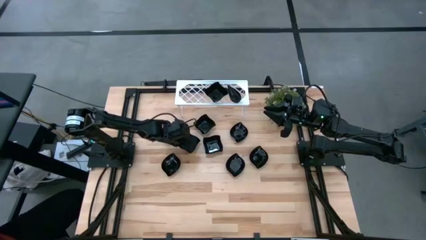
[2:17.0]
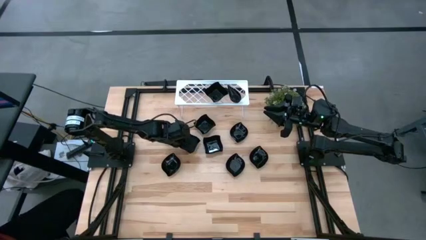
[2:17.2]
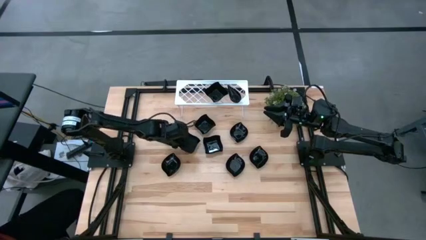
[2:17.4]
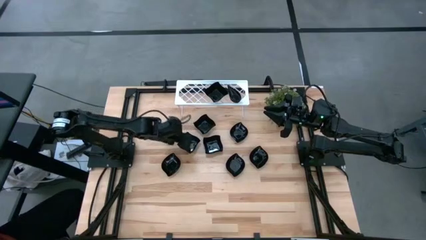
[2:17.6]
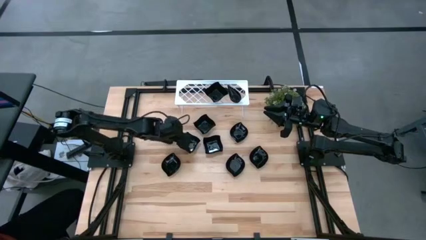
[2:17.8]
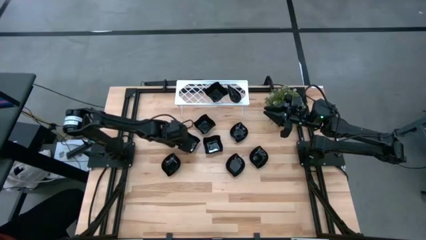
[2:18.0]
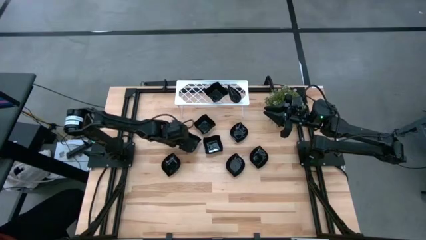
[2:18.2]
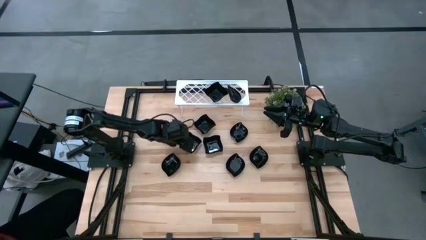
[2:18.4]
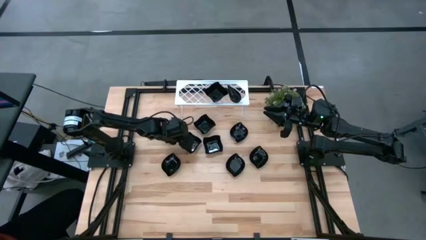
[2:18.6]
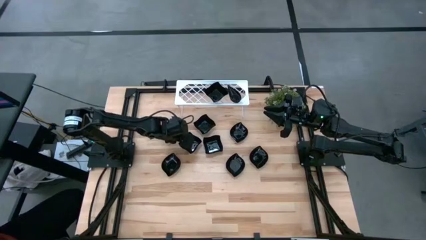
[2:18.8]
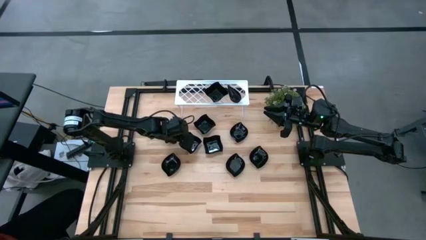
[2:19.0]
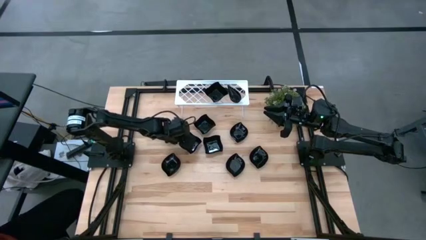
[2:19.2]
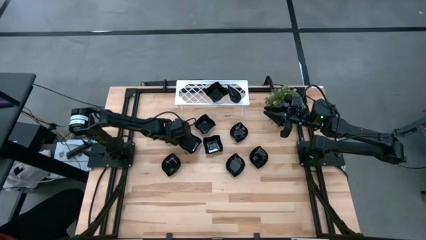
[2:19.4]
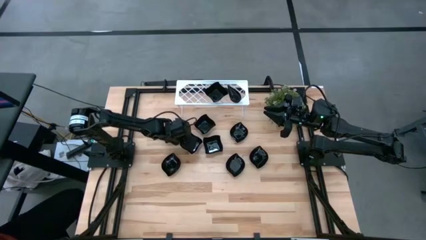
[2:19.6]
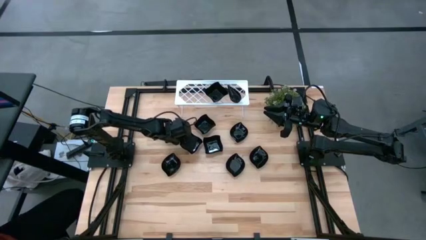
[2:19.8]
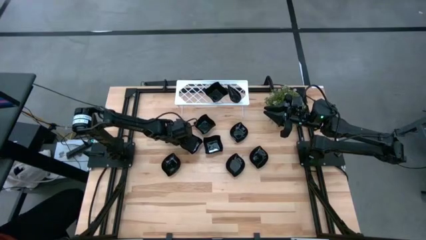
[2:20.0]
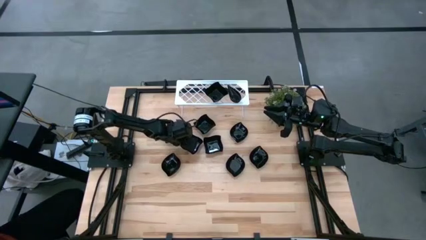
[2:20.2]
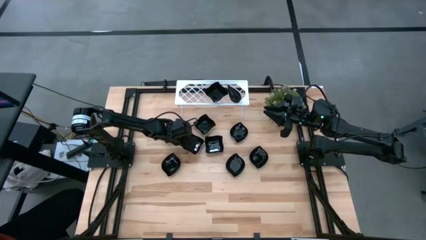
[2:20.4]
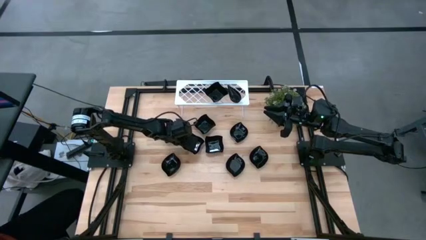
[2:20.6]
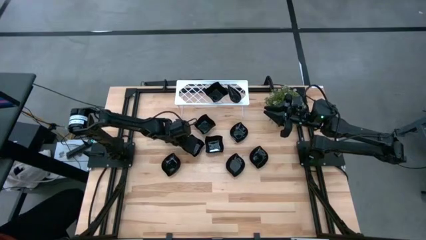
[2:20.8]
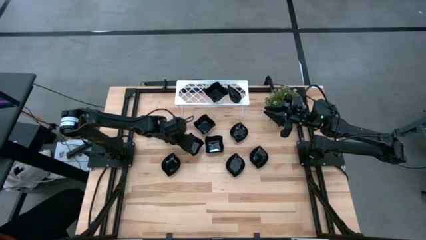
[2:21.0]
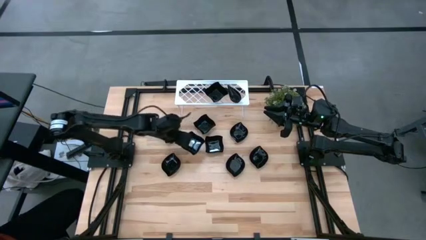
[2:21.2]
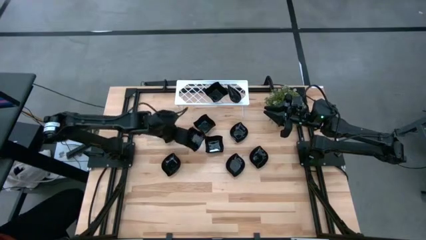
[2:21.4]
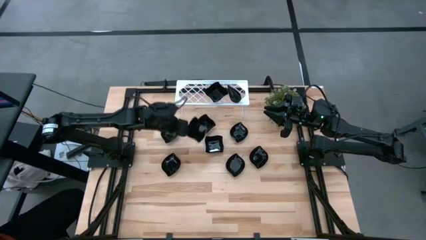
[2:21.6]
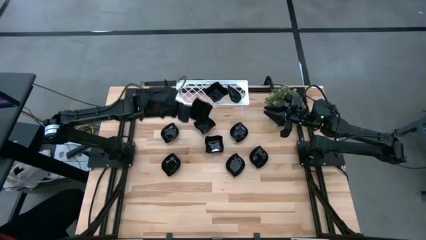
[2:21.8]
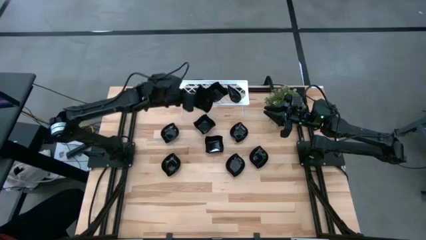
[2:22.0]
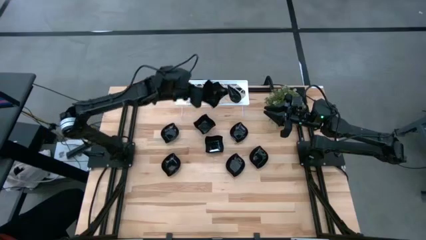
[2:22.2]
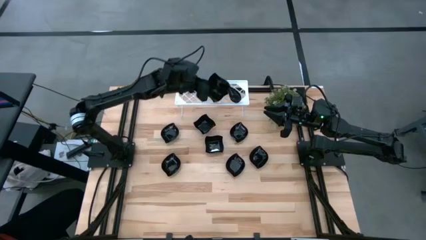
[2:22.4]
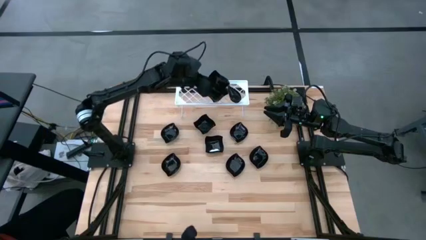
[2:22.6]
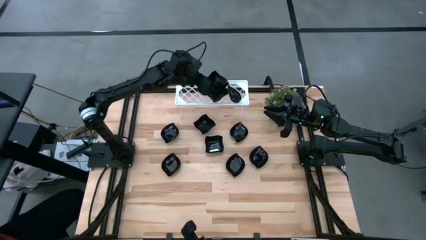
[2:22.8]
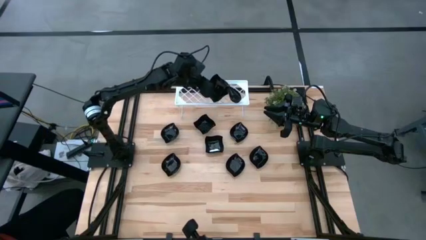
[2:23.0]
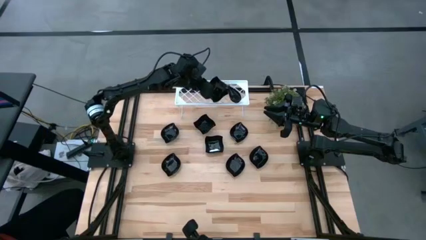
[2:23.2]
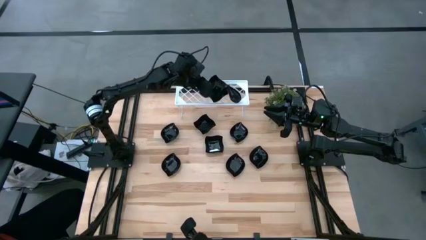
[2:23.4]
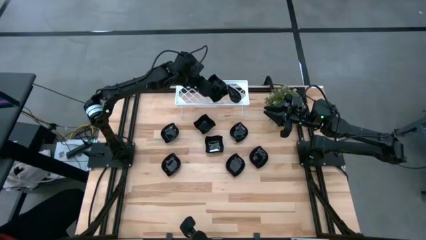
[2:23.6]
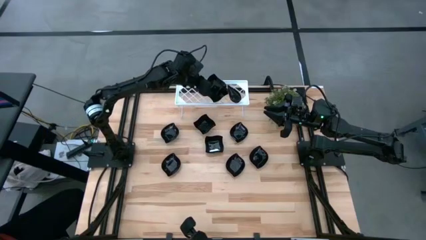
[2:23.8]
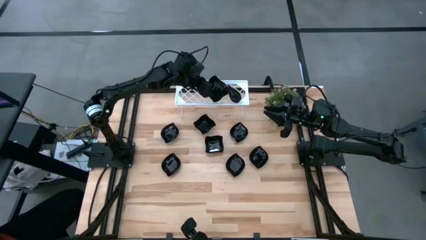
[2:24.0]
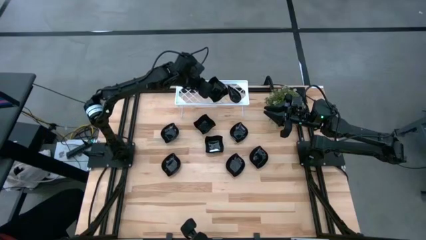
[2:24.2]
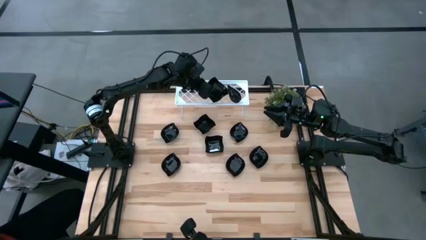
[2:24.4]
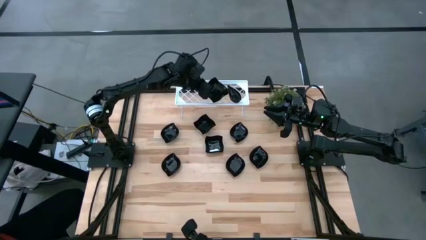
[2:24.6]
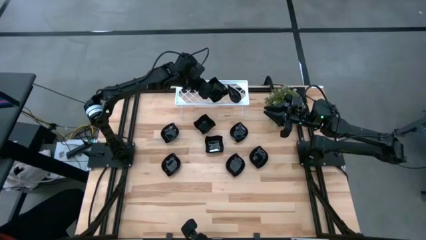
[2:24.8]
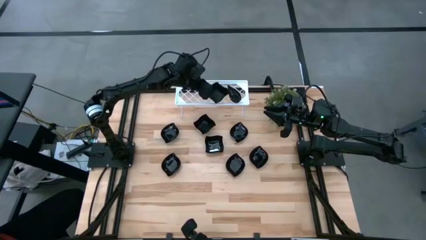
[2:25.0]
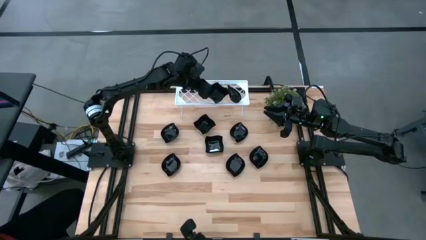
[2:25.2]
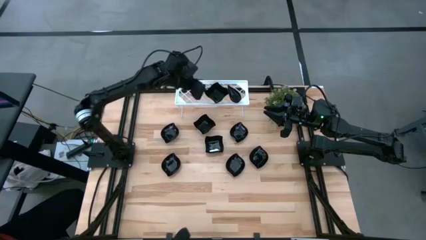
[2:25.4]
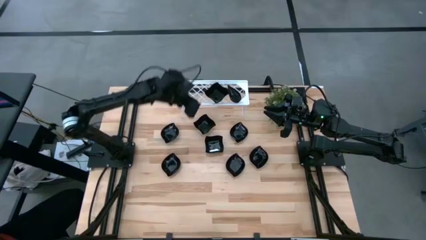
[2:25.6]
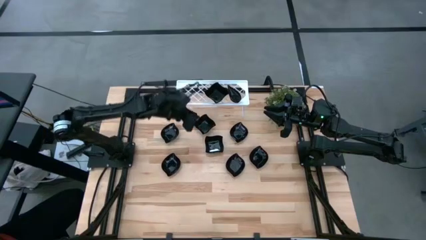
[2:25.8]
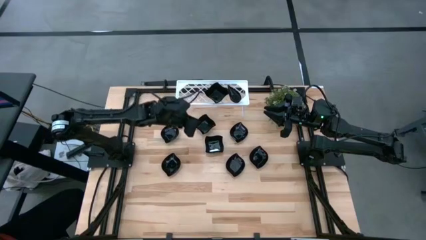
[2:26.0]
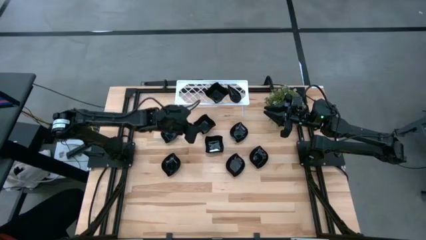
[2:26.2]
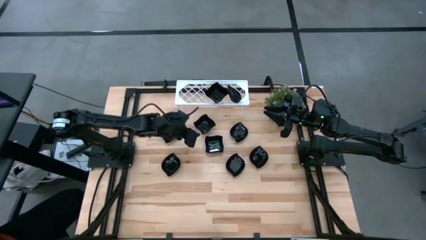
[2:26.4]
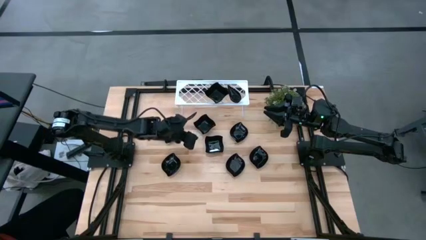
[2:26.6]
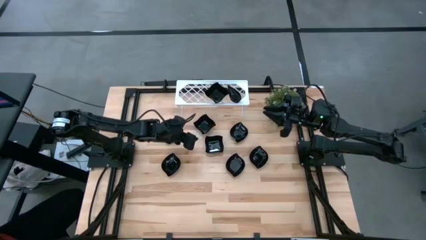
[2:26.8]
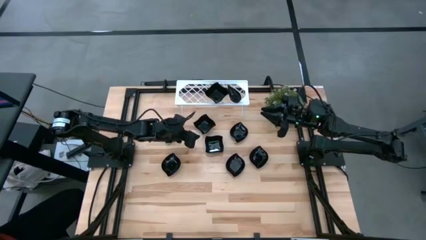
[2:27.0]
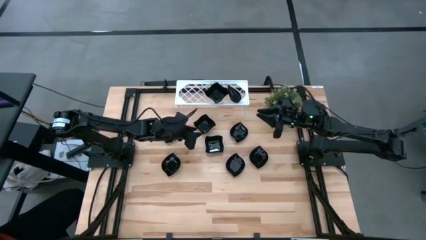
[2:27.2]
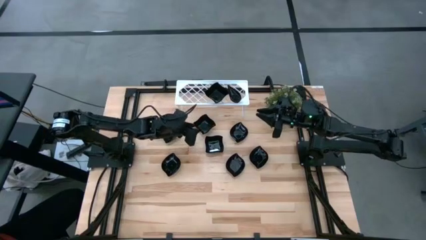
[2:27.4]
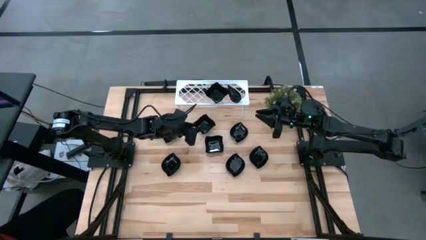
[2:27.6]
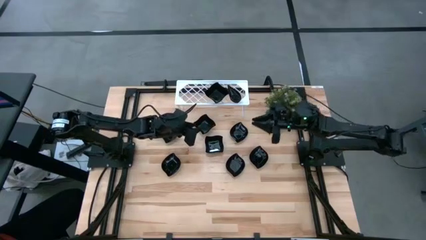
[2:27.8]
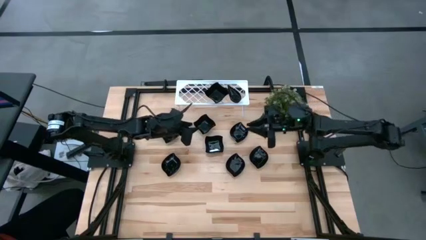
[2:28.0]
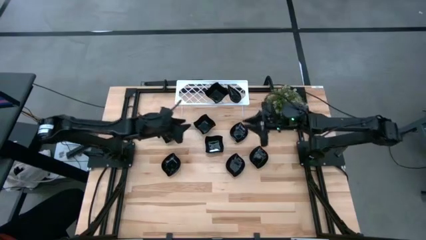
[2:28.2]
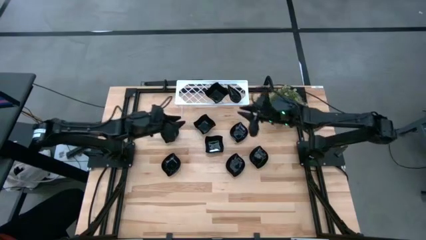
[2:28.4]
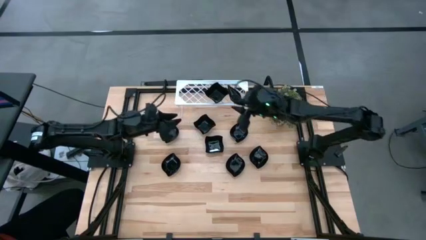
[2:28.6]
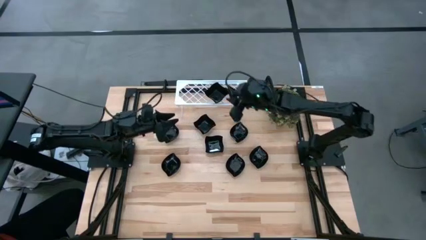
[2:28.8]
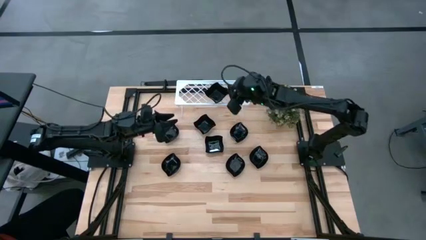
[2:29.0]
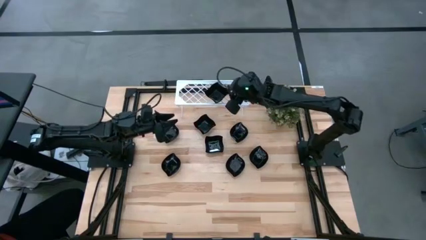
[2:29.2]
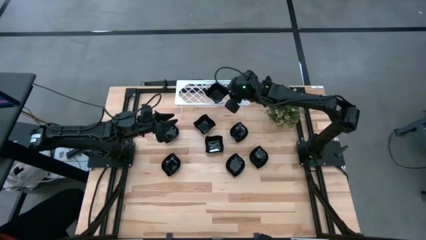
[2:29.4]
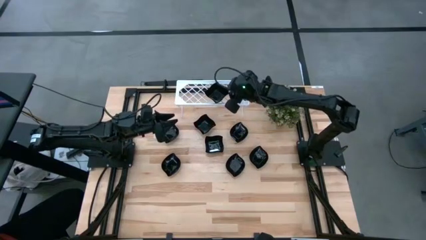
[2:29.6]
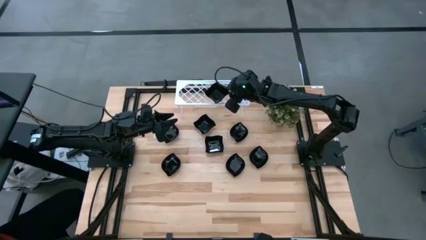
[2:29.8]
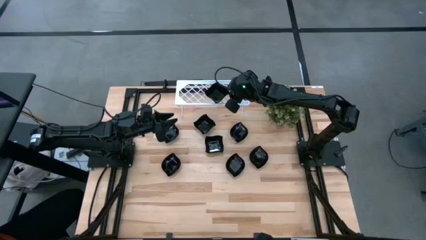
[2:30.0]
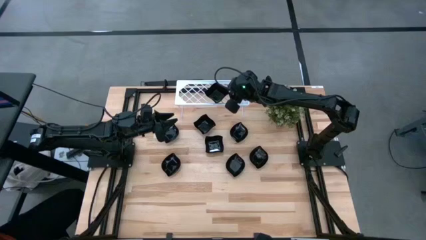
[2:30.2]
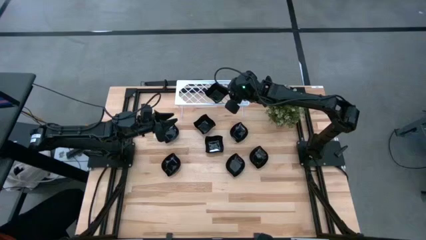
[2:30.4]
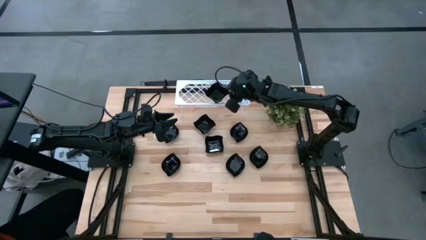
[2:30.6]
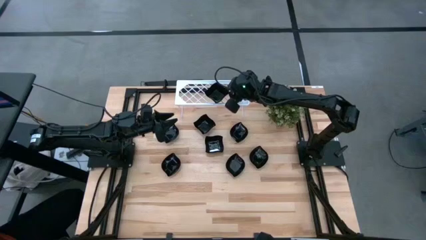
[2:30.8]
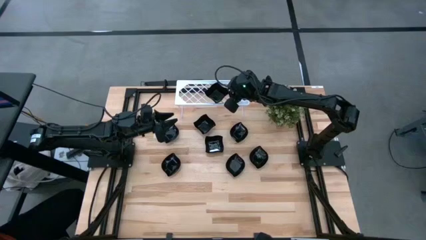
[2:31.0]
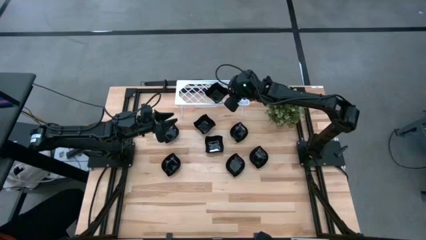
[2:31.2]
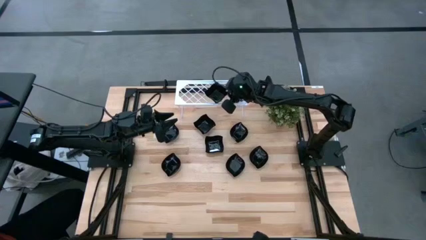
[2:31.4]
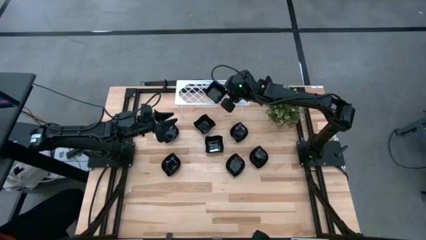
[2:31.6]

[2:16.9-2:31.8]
Task: Pick & Place Mini shaped plates
Stack the distorted square plate on top of the other distorted square plates on the shelf

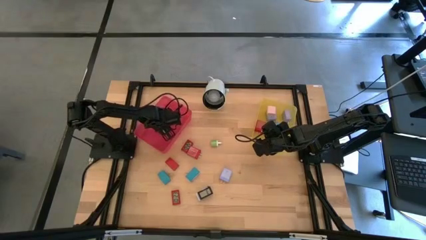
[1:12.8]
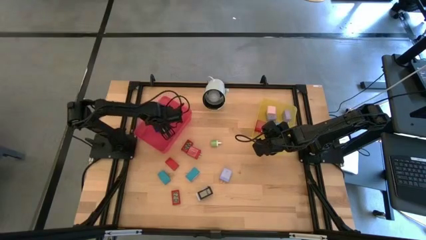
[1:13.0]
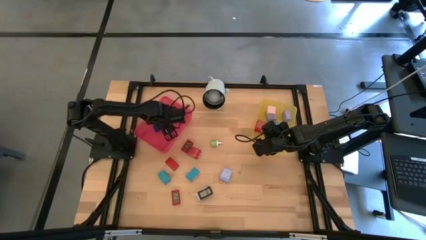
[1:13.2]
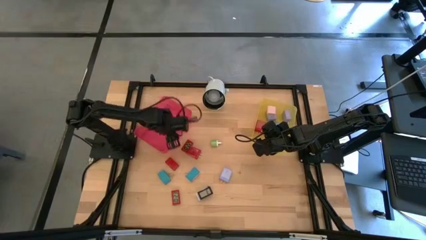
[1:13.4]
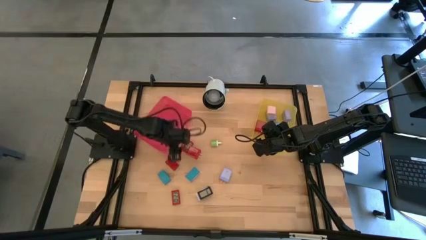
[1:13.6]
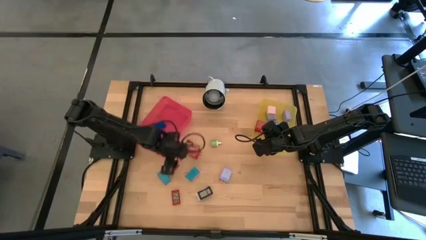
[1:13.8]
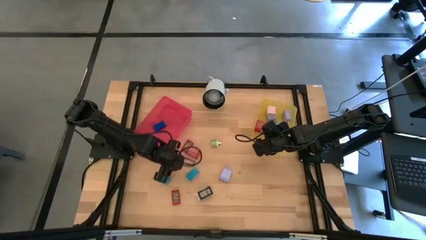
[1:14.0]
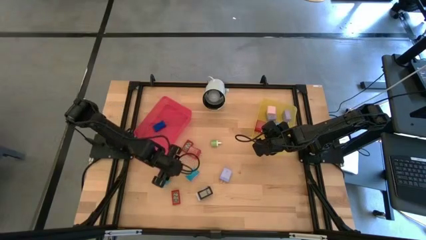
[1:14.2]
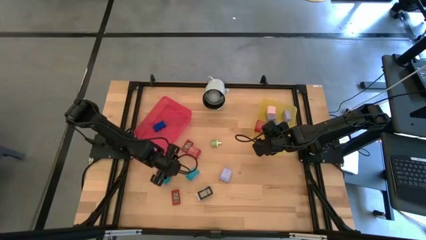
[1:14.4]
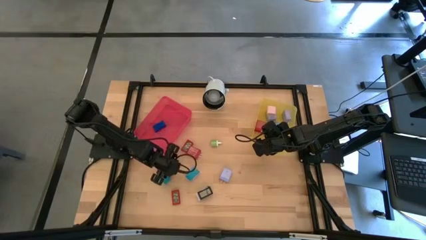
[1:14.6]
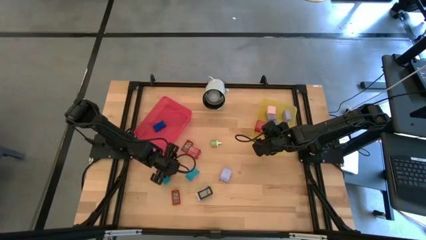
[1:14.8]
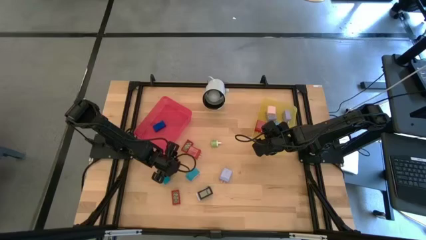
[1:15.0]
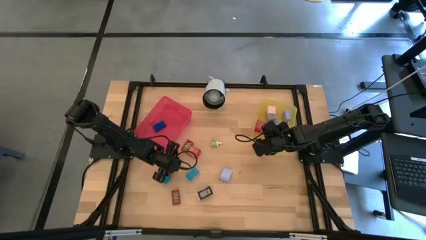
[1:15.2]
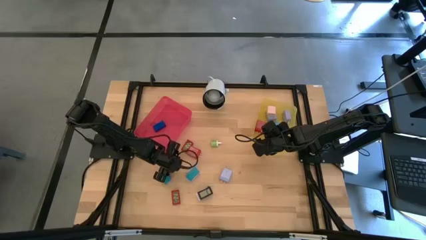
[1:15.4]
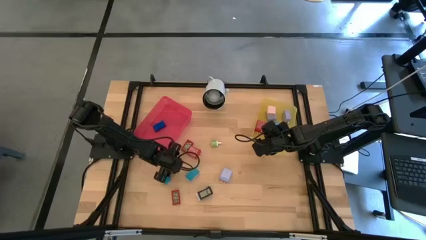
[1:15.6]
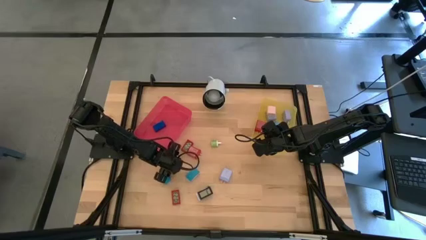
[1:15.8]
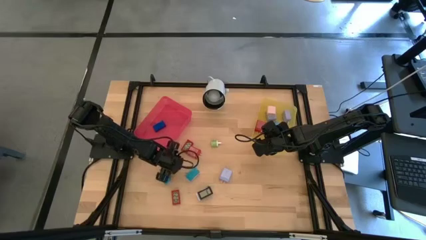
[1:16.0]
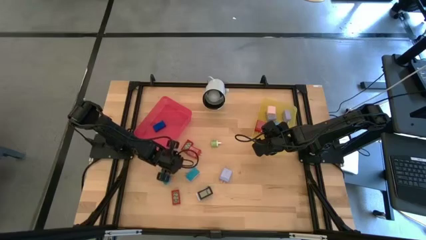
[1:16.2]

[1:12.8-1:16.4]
Task: Pick & Place Office items
Put the middle red digital timer into the pink bin
